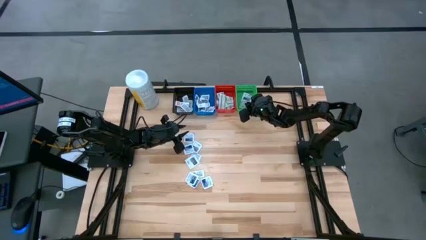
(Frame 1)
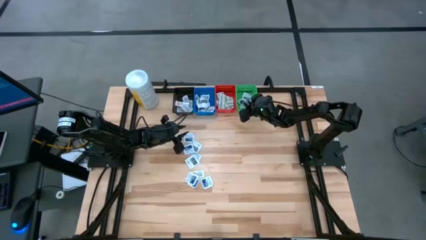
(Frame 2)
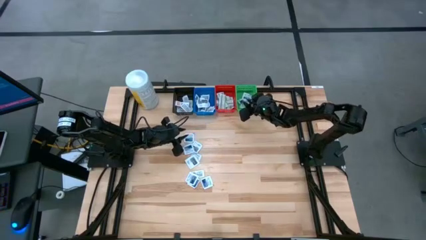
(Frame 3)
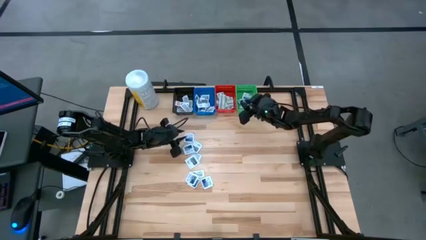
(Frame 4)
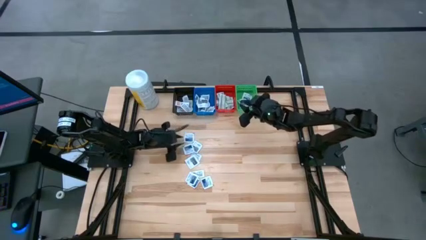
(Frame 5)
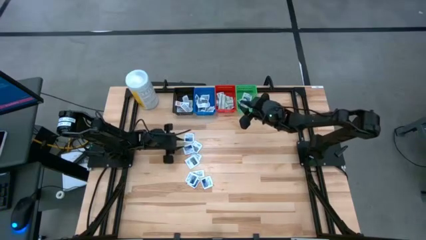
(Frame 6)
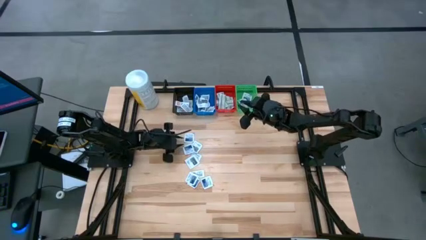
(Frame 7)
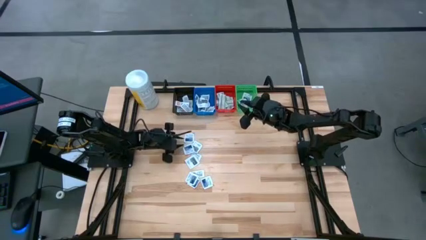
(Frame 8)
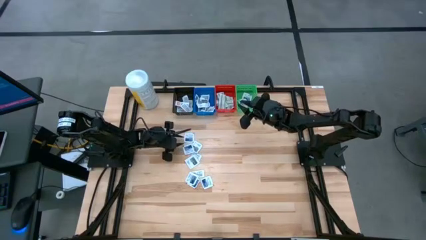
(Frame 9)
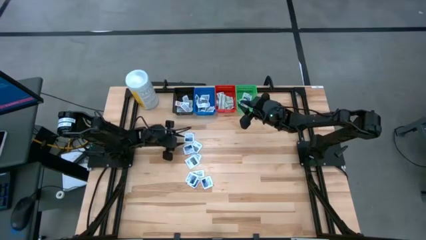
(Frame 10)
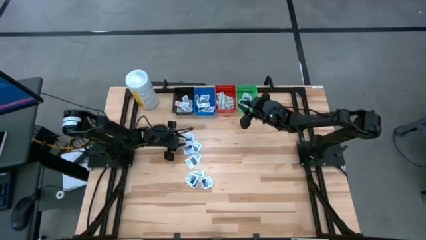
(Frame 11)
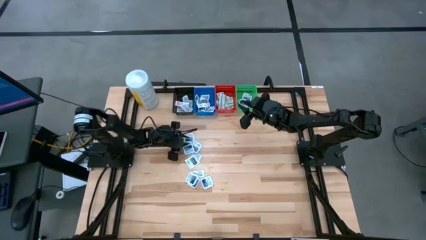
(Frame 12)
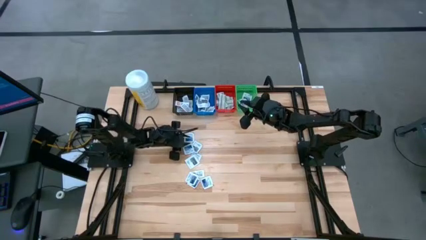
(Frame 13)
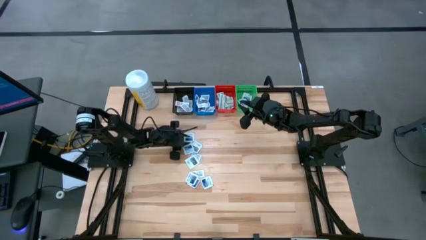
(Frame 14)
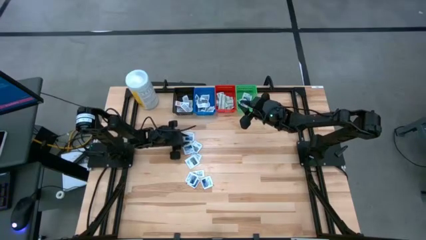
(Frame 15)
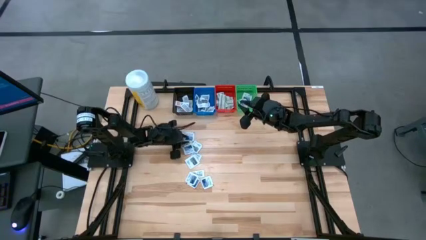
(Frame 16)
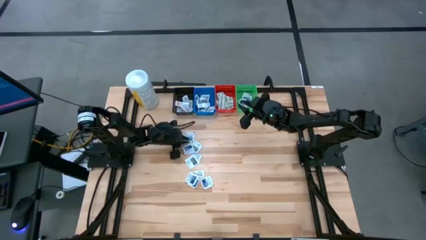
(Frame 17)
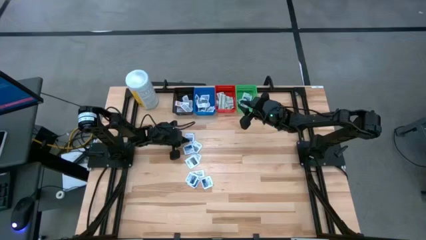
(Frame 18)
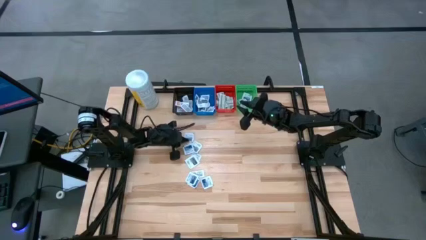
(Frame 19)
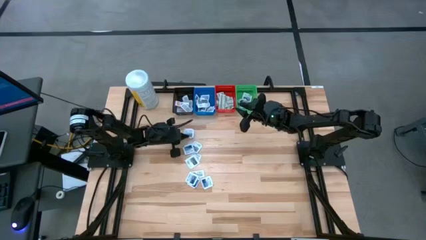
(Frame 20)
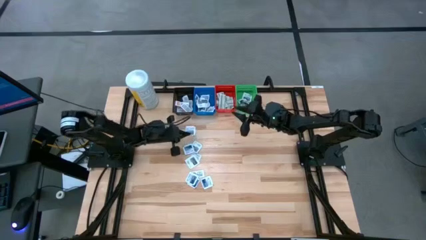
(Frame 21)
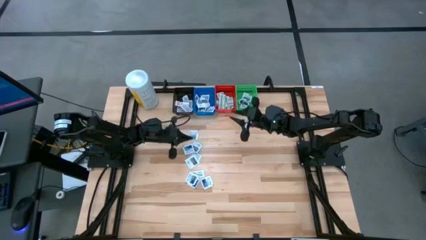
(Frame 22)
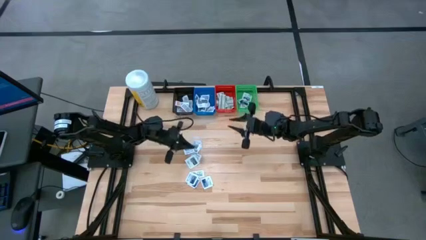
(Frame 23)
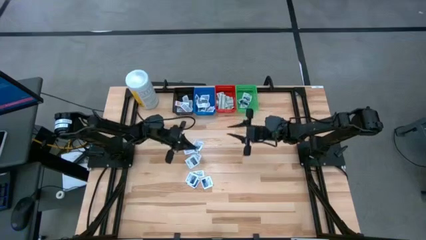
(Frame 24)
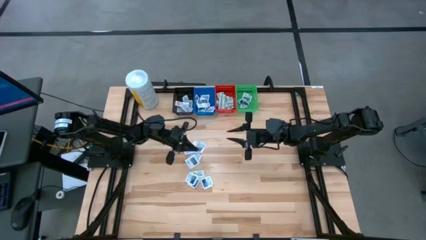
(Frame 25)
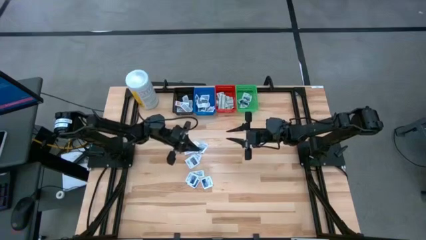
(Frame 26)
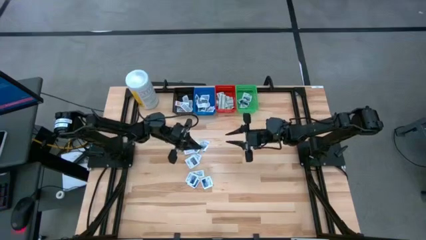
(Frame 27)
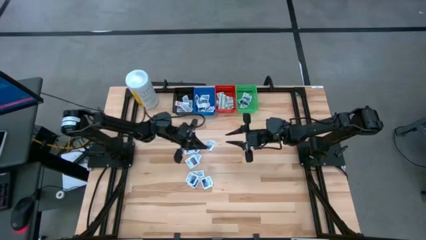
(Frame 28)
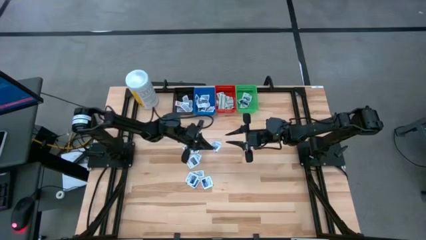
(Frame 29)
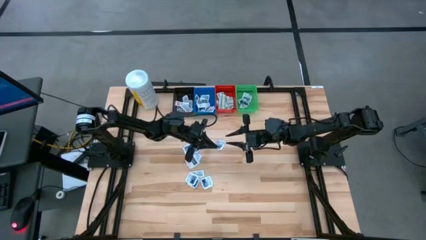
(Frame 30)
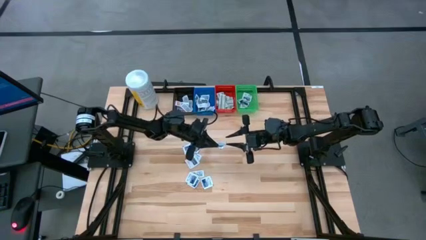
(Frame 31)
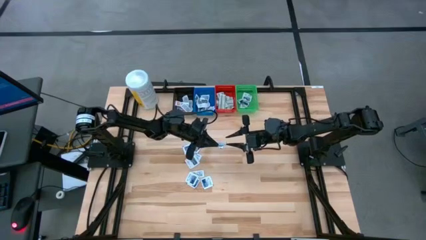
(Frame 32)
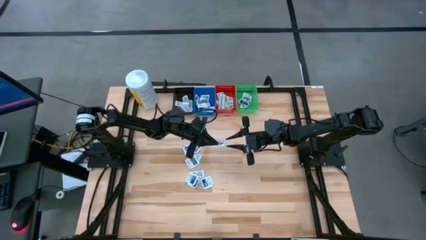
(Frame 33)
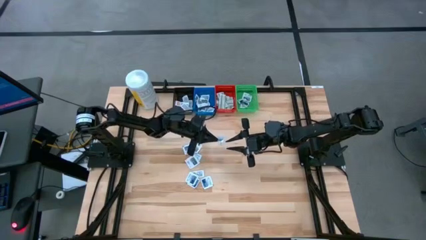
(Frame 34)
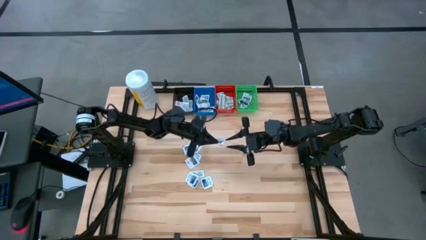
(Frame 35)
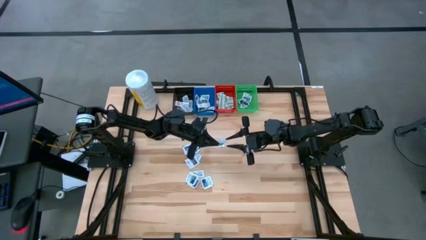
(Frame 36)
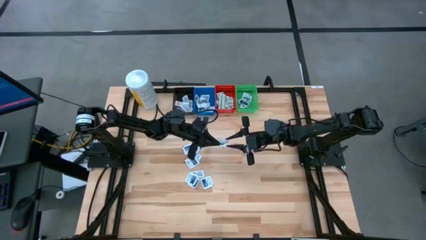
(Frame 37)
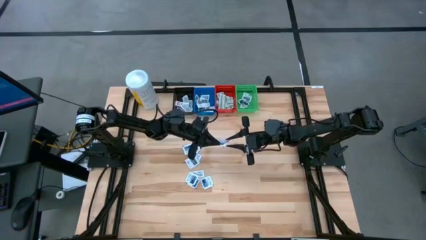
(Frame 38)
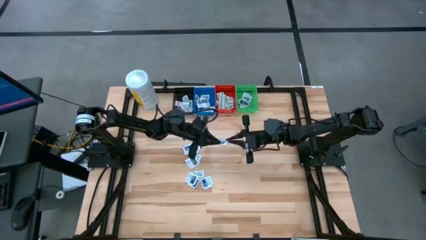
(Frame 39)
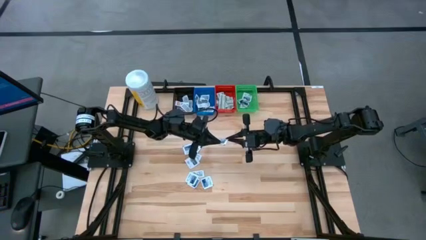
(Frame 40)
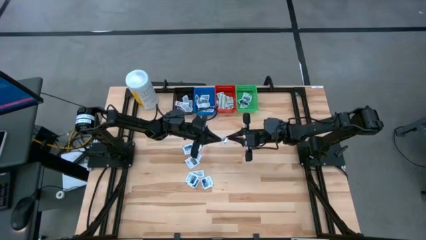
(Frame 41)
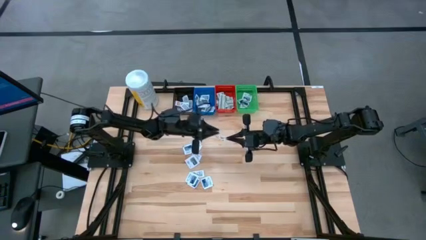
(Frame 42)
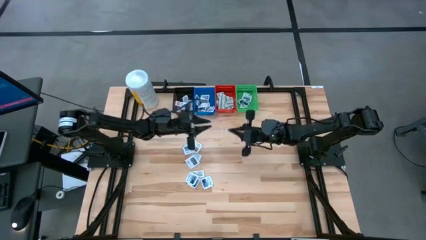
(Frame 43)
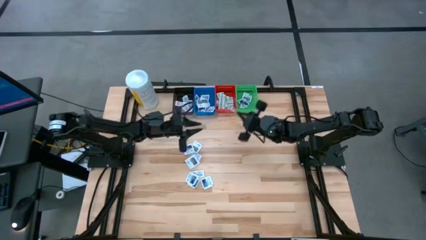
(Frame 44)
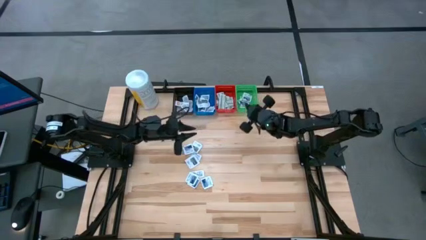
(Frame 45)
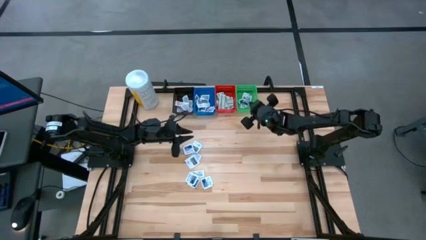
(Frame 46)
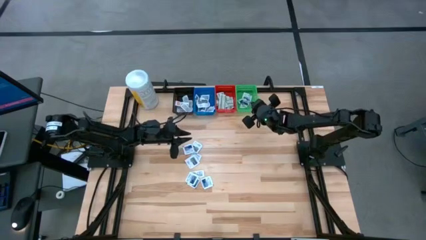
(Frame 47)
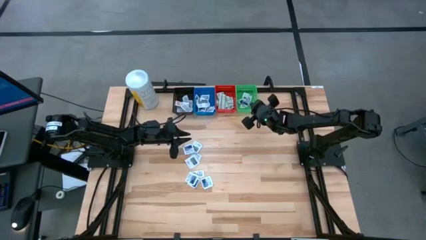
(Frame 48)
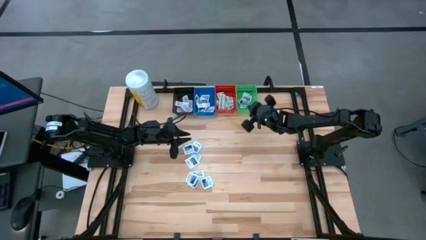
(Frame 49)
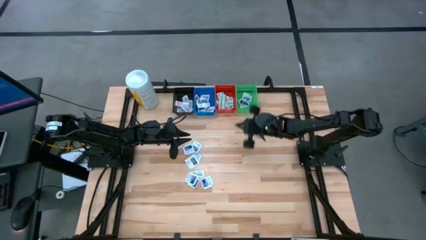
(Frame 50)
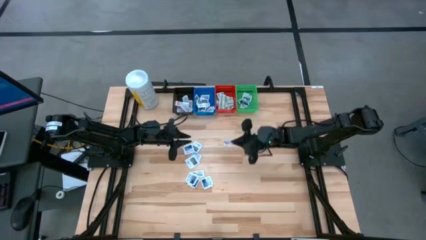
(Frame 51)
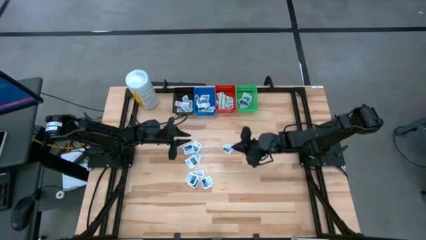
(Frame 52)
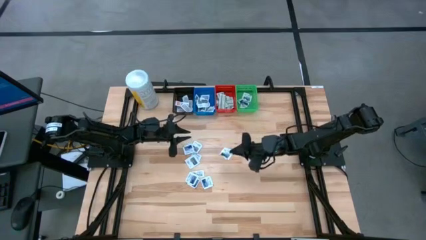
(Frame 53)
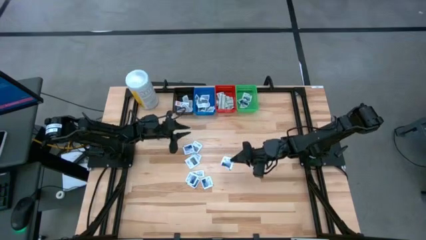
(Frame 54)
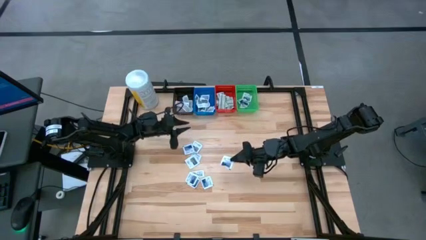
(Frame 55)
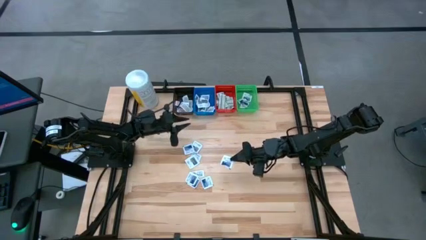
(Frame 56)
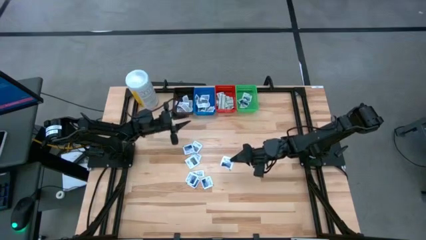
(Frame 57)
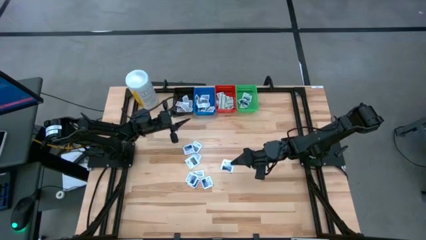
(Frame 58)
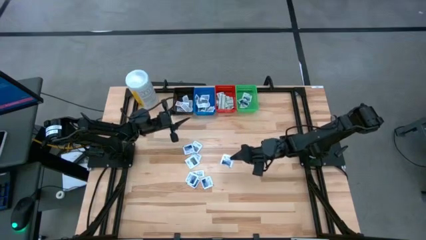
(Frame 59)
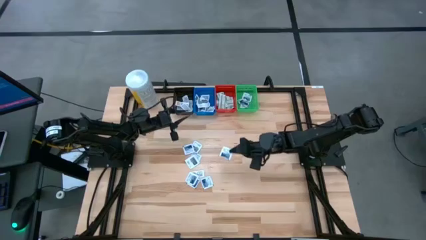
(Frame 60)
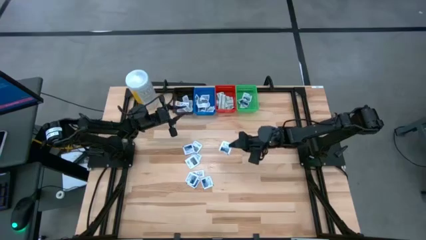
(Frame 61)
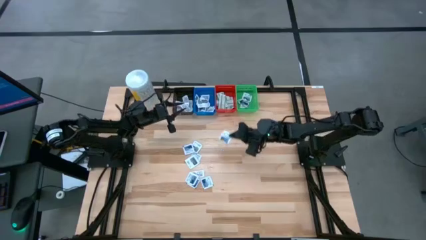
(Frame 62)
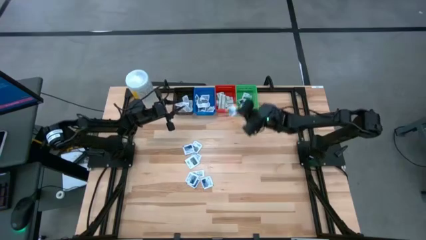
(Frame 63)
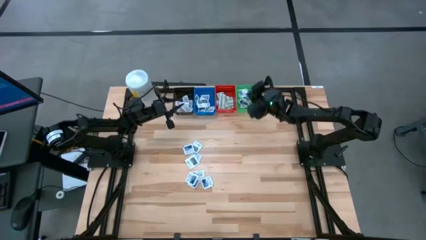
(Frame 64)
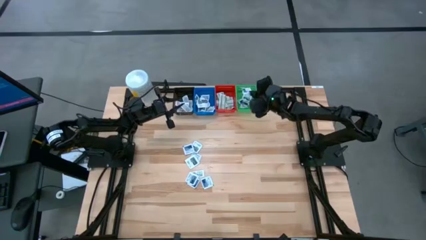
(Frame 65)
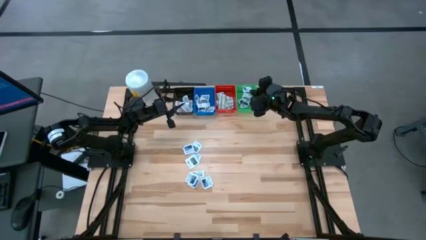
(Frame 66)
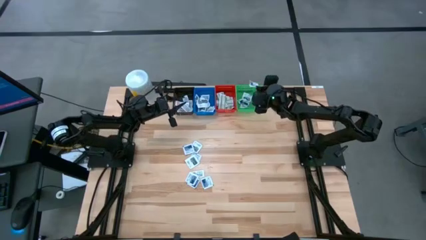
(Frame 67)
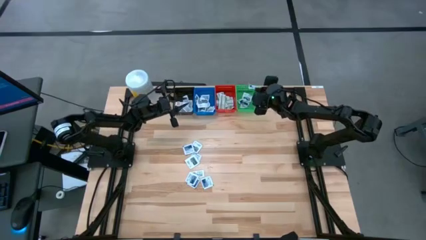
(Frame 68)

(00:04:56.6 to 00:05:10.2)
Task: Pick & Place First Aid Supplies
Put the blue alcohol pad into the green bin
